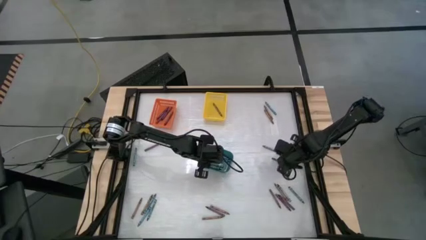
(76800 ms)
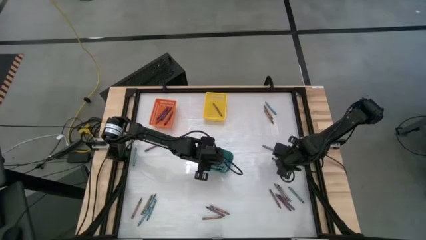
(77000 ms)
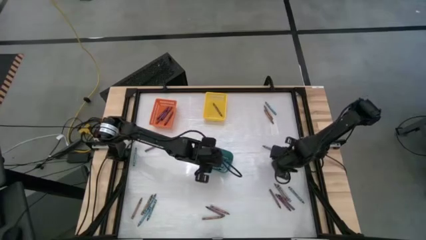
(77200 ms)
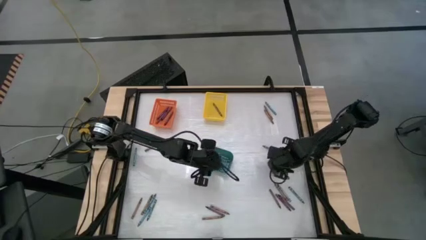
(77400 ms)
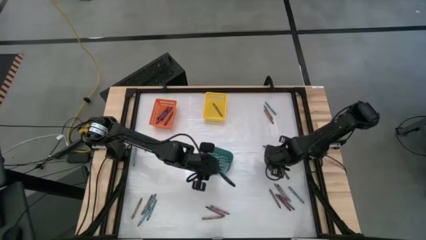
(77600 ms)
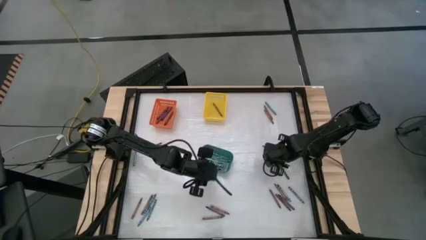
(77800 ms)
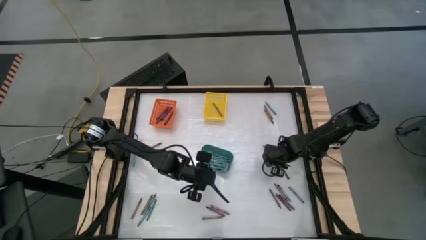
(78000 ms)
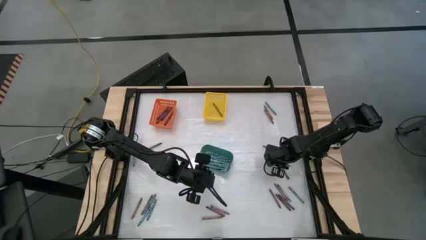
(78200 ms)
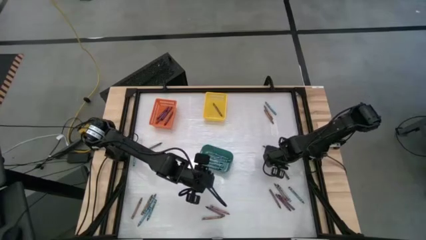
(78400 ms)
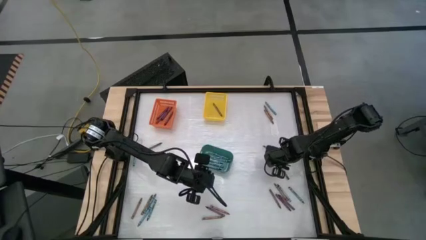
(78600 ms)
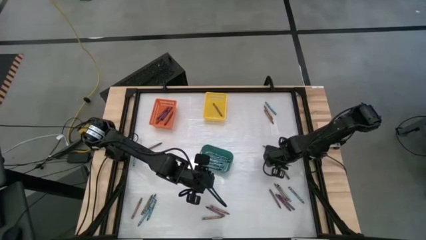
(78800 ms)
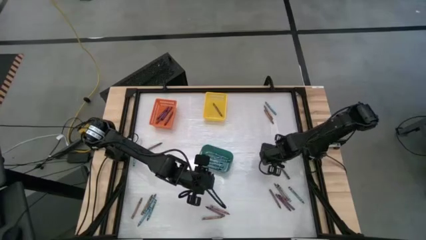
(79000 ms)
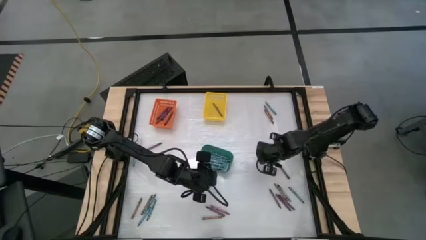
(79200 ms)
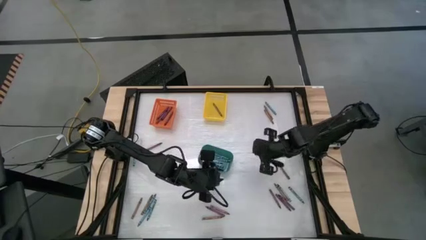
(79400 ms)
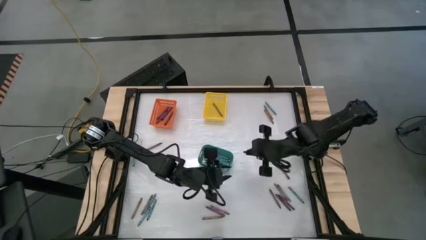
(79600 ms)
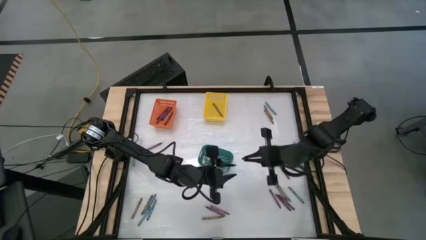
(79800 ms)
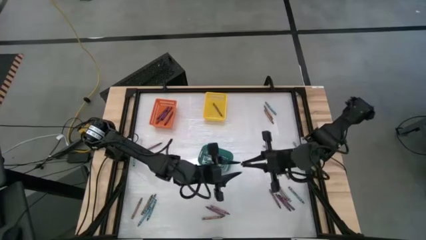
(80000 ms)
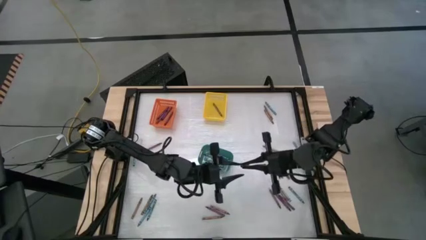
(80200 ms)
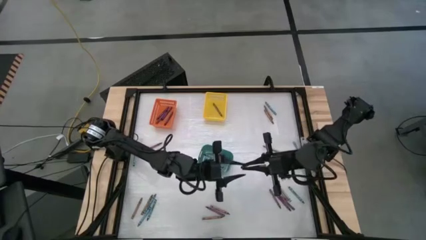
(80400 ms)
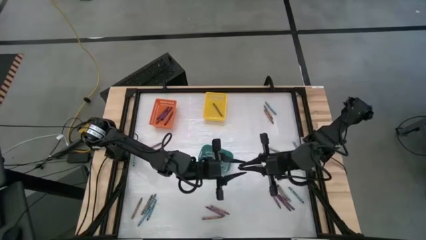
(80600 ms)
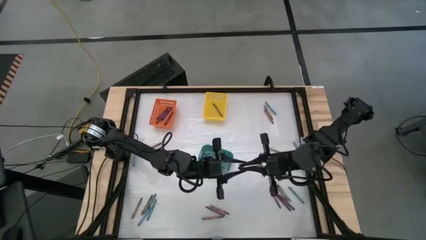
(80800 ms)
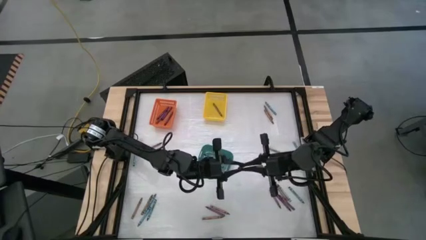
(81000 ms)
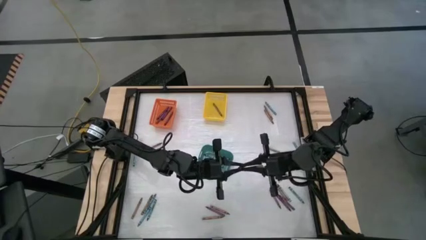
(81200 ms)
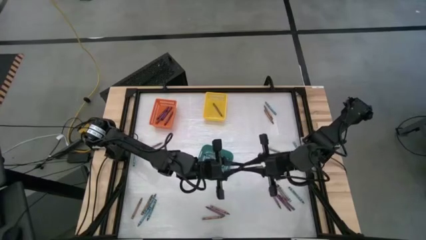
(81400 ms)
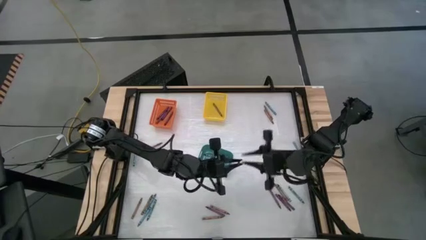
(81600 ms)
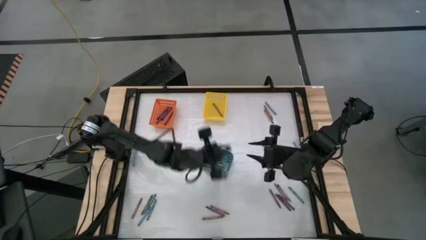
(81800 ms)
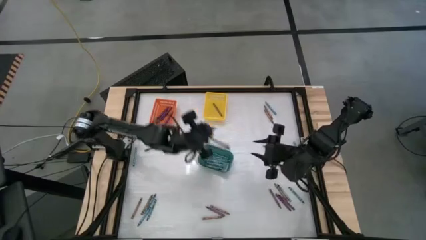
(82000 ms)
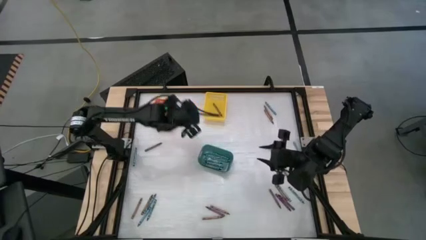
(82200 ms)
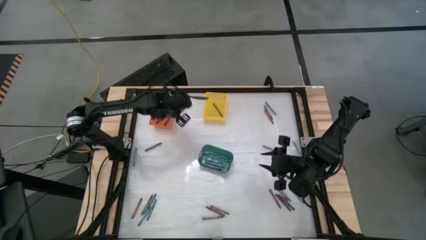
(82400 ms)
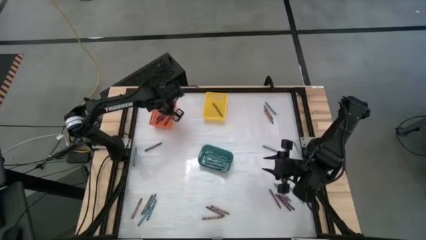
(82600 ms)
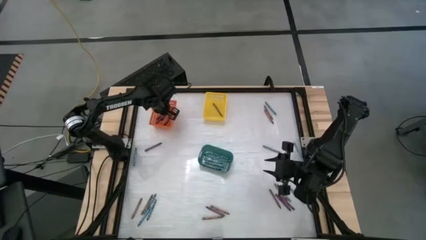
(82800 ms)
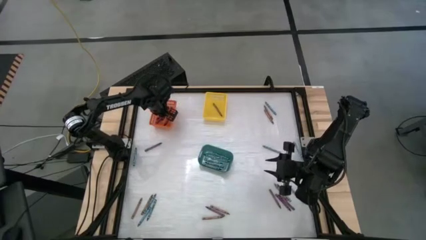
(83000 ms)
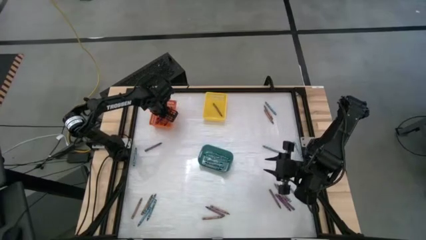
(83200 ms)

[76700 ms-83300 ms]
Task: Sort crayons
Put the violet crayon into the orange bin

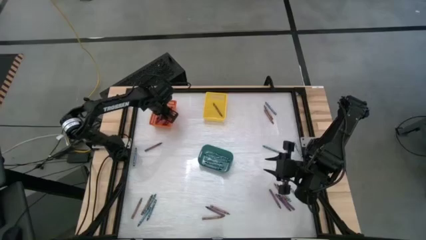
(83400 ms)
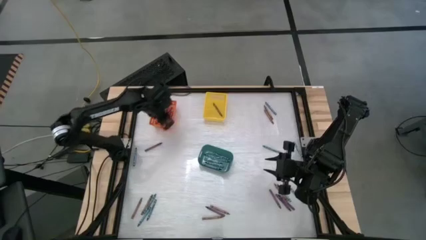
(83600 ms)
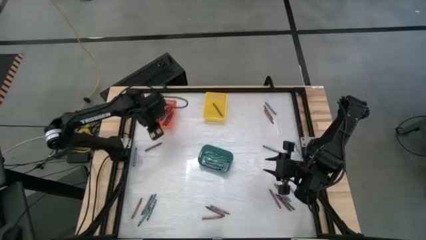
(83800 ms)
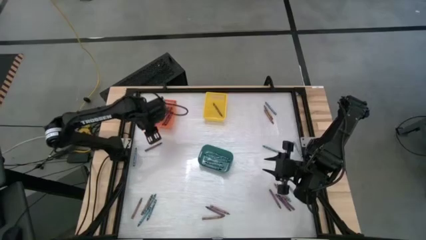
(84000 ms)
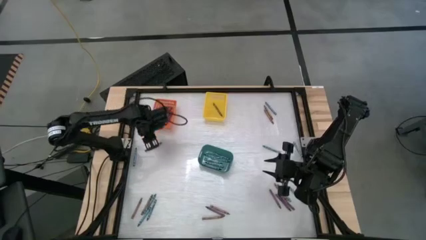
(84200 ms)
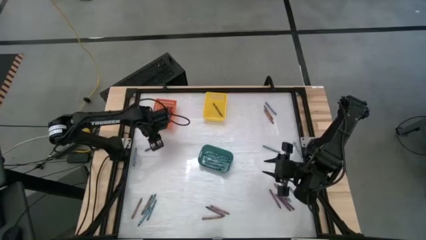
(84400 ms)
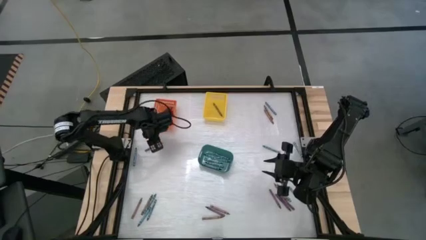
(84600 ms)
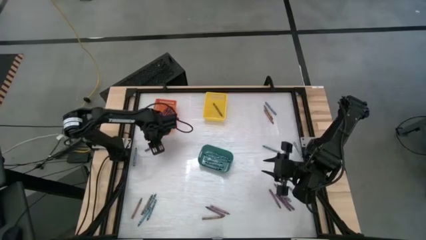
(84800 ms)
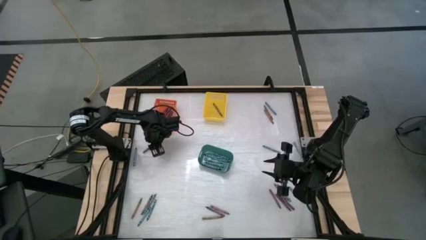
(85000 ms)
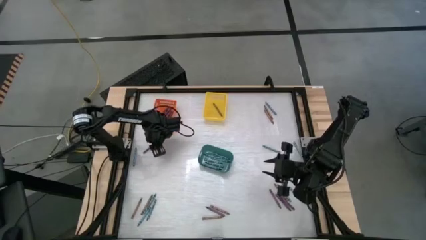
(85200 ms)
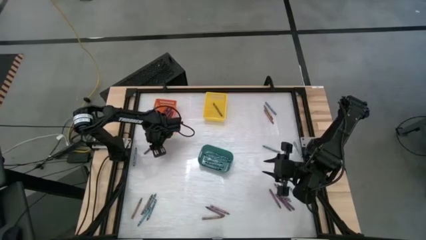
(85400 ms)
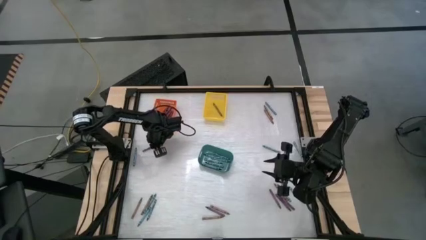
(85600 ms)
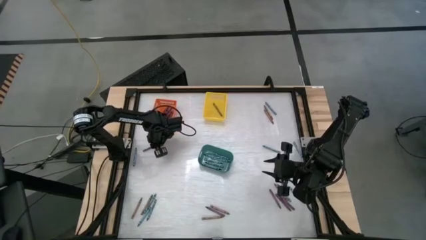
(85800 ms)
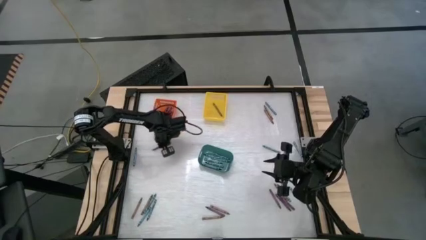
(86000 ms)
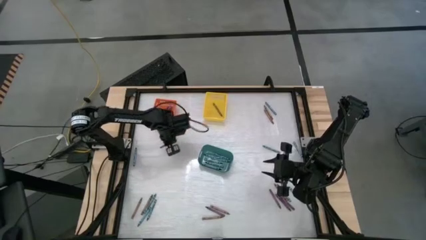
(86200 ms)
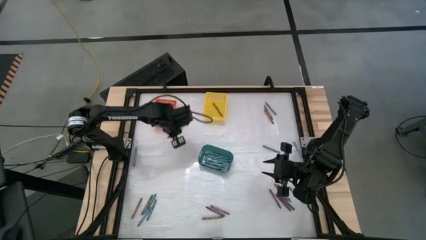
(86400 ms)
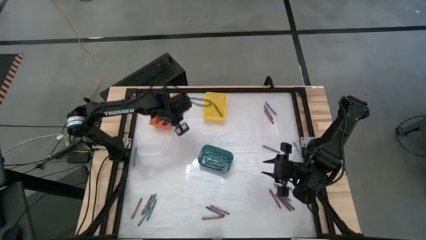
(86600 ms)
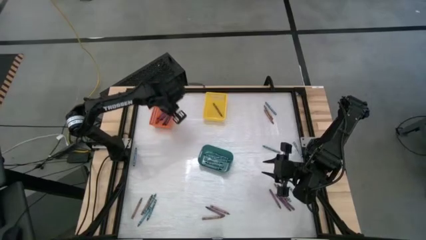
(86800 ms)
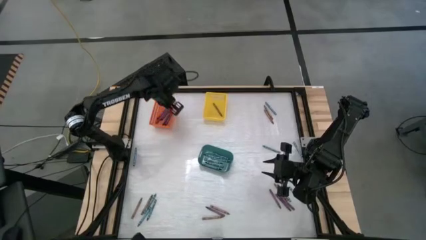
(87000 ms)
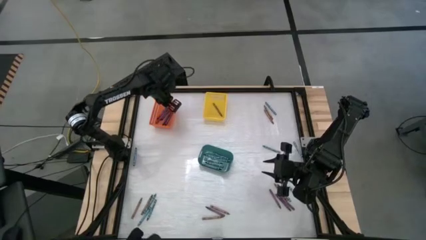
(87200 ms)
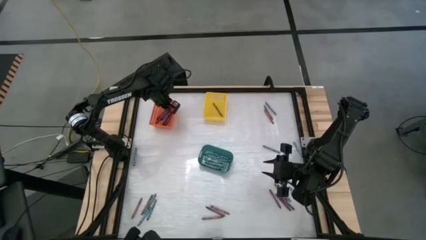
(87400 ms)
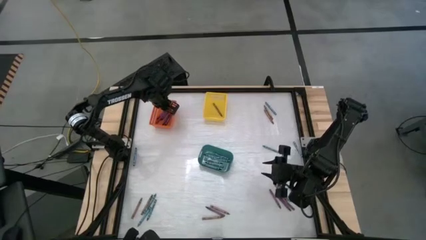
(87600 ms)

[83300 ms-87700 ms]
Put the violet crayon into the orange bin

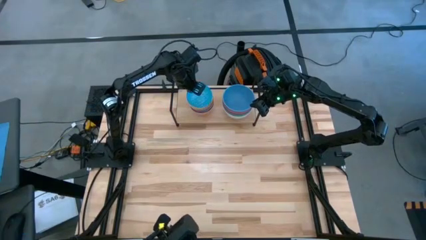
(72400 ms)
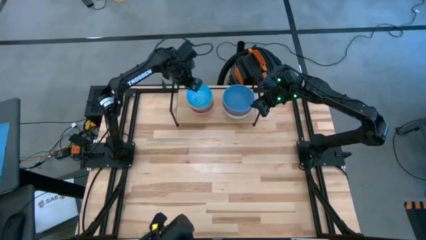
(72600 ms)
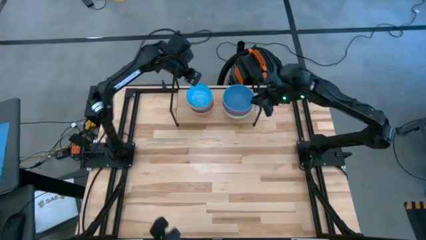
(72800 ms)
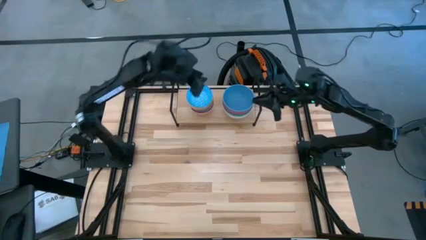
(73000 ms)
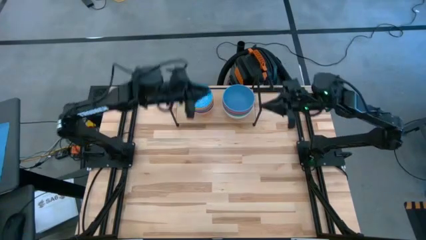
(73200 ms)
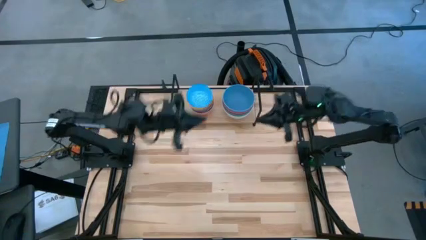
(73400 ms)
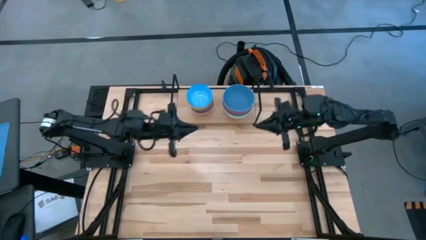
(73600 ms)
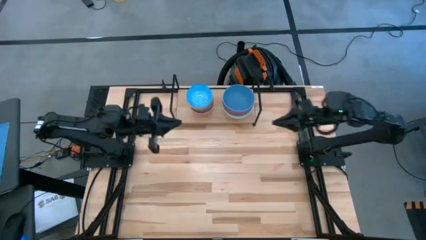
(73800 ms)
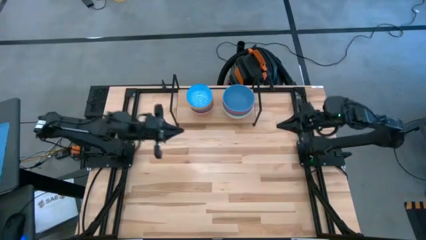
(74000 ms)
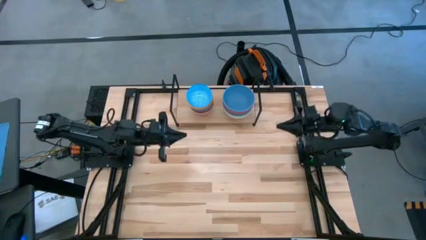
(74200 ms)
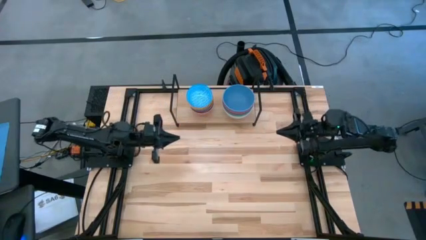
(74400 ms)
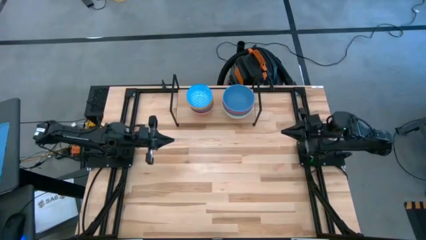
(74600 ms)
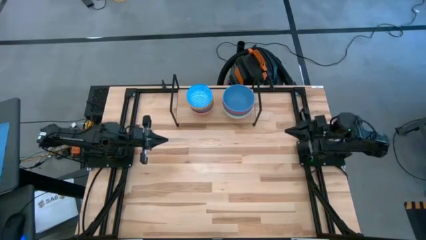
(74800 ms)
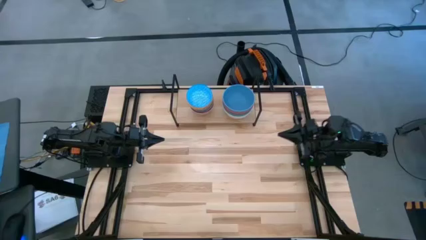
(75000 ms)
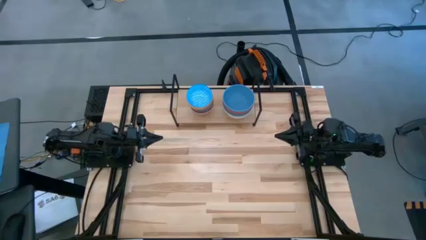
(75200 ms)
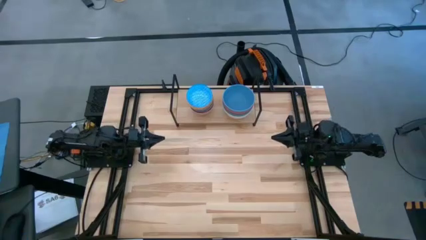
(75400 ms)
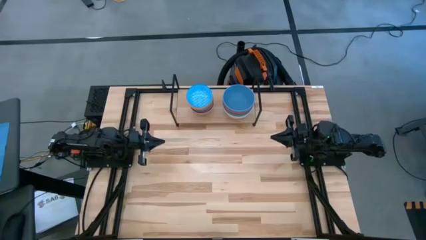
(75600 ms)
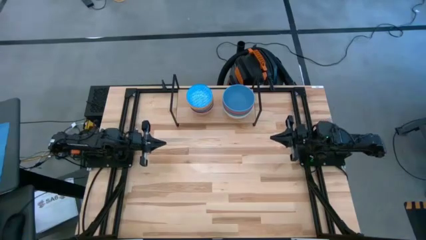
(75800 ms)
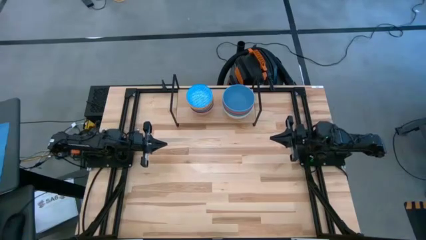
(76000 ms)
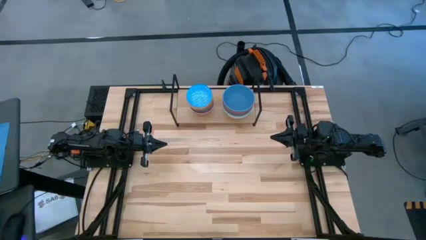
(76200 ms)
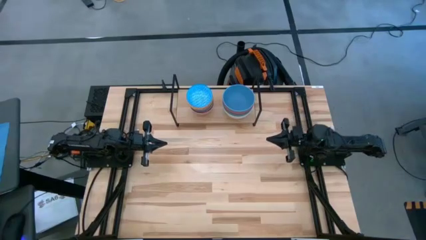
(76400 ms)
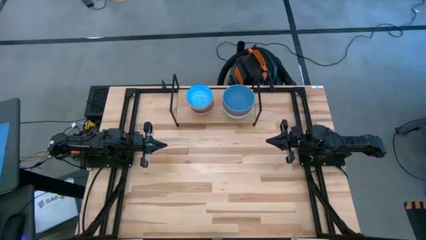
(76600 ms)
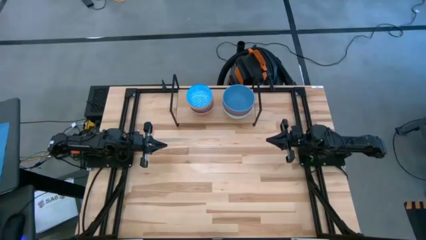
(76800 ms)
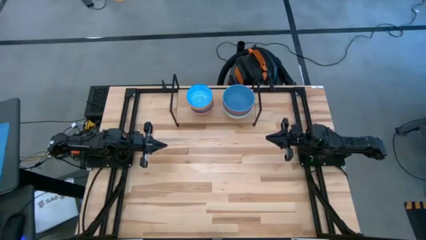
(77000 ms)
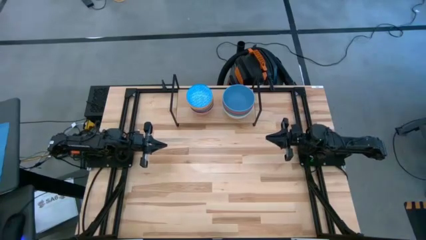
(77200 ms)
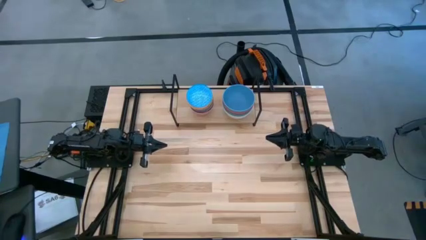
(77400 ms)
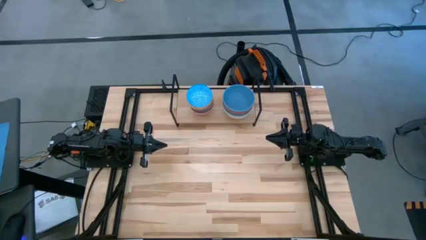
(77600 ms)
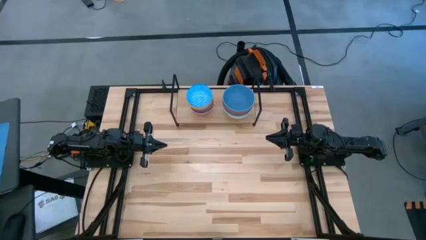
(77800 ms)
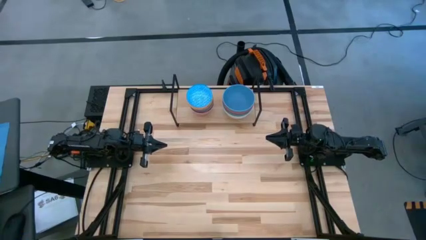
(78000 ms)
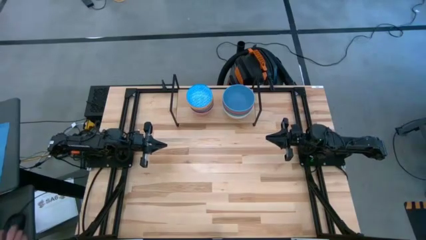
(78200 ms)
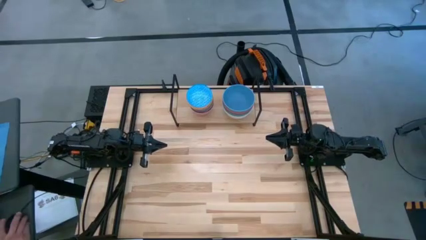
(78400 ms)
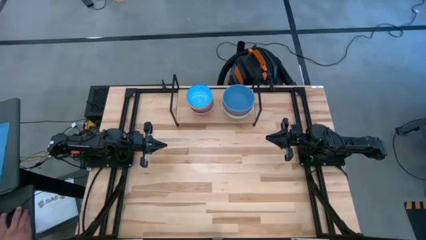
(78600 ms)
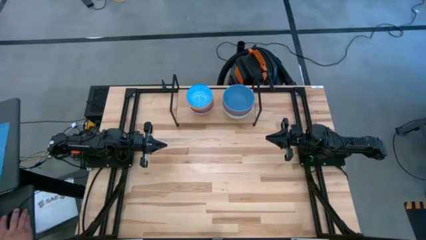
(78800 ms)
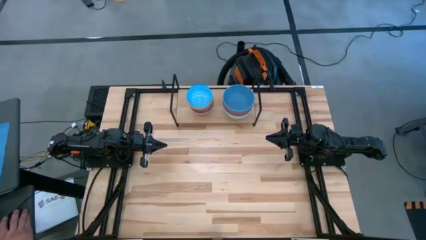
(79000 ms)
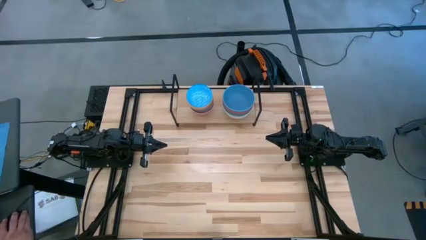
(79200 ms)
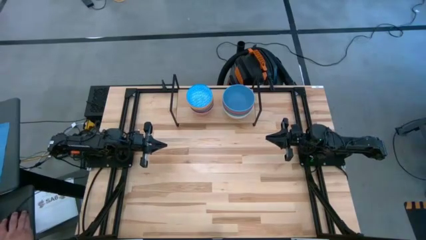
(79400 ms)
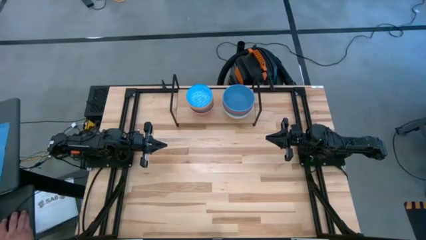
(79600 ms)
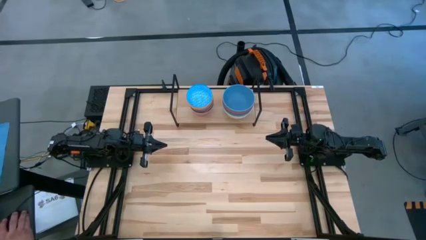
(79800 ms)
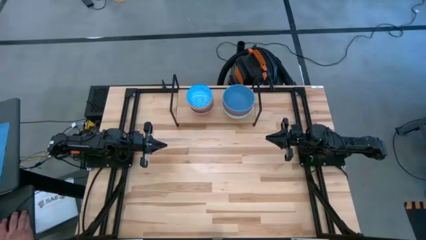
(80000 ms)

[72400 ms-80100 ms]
Task: Place and stack bowls onto a shelf
Return to Home Position
